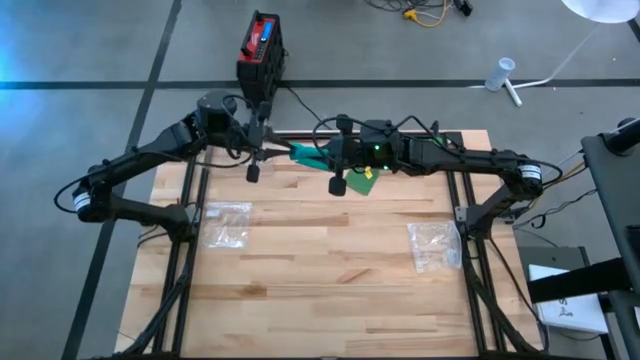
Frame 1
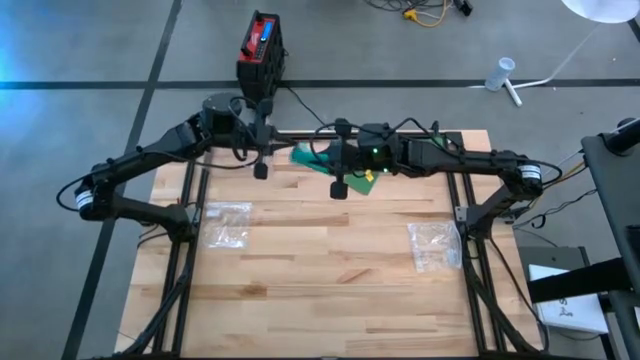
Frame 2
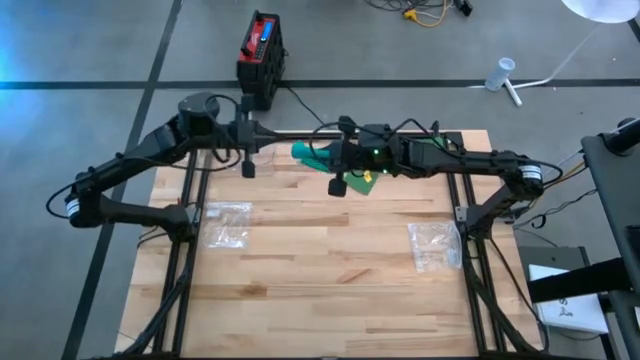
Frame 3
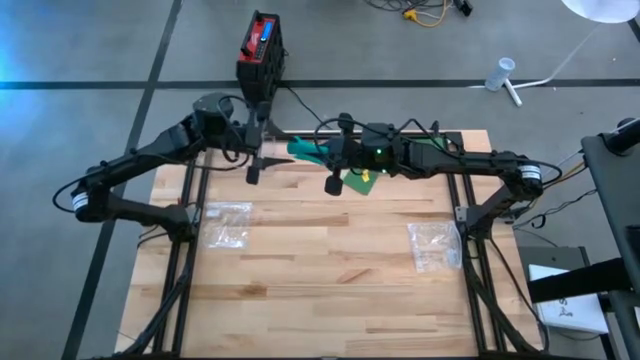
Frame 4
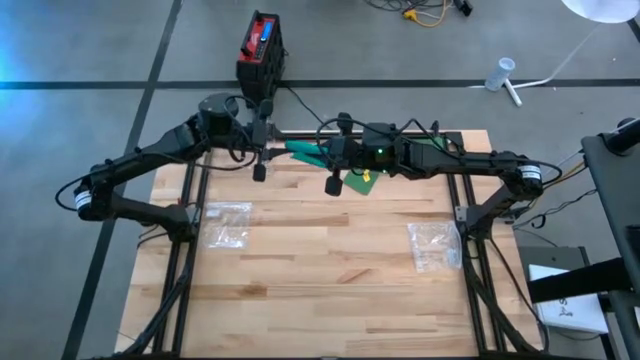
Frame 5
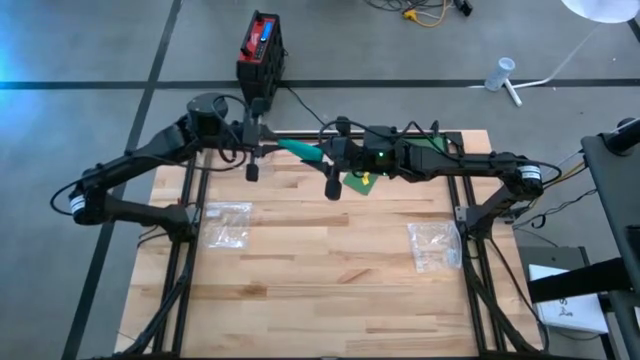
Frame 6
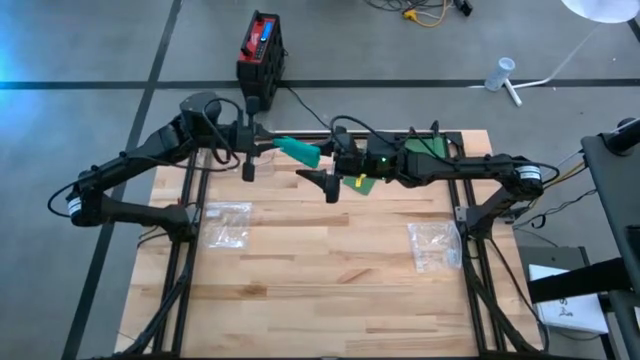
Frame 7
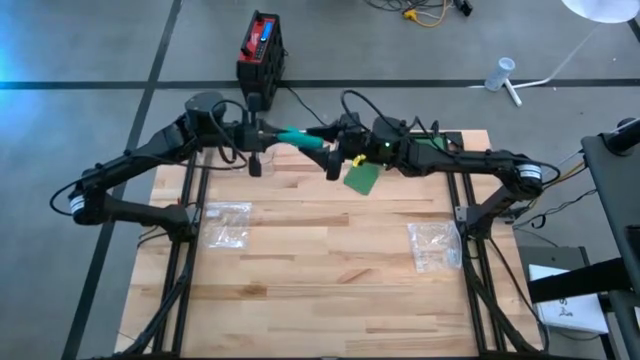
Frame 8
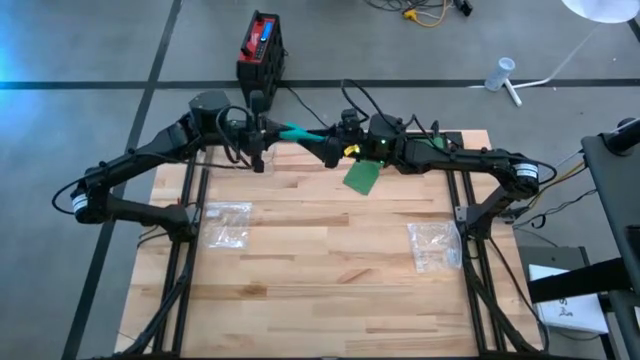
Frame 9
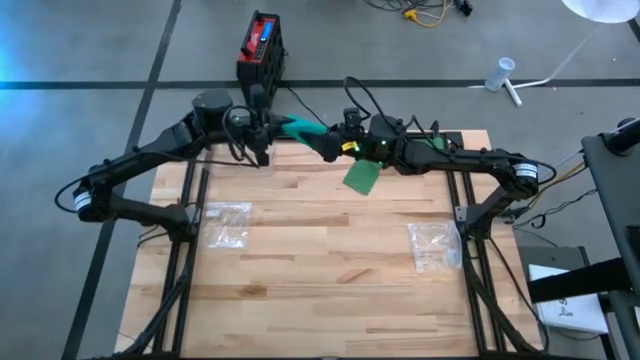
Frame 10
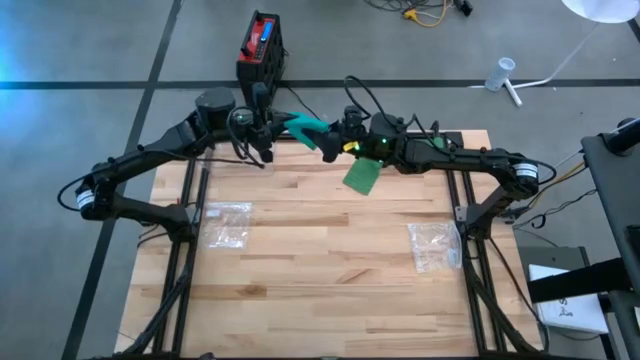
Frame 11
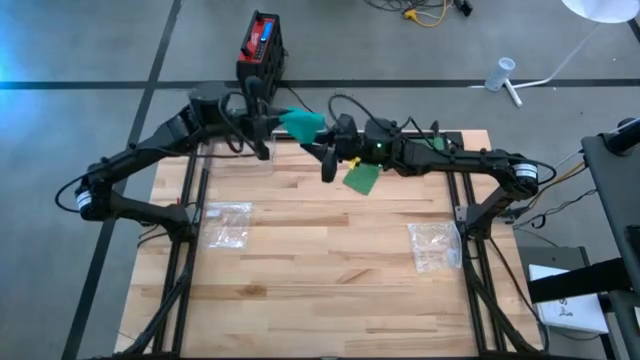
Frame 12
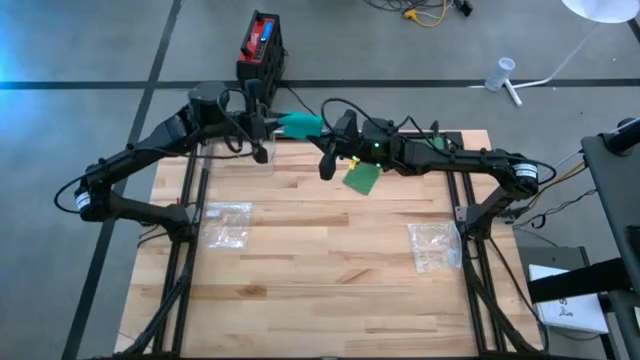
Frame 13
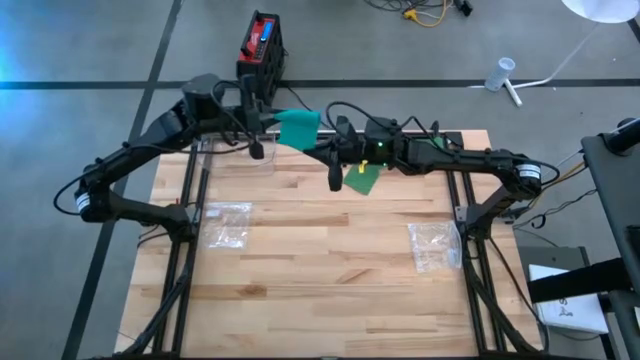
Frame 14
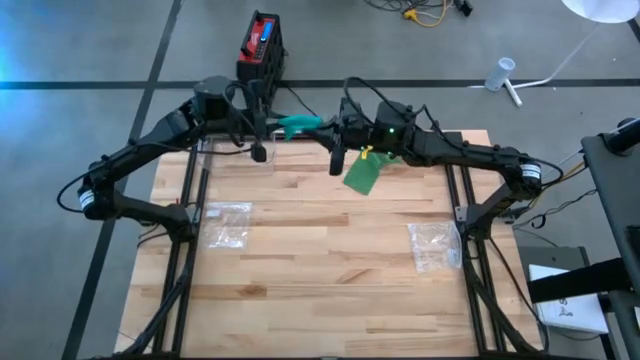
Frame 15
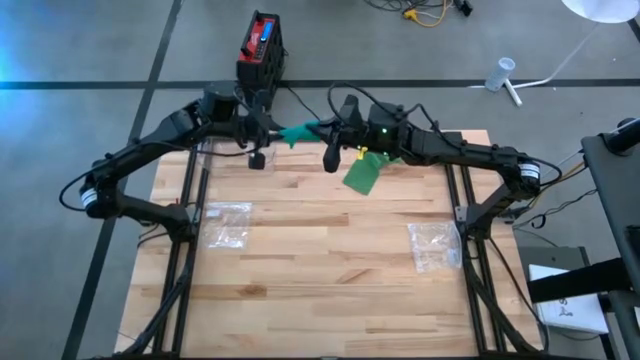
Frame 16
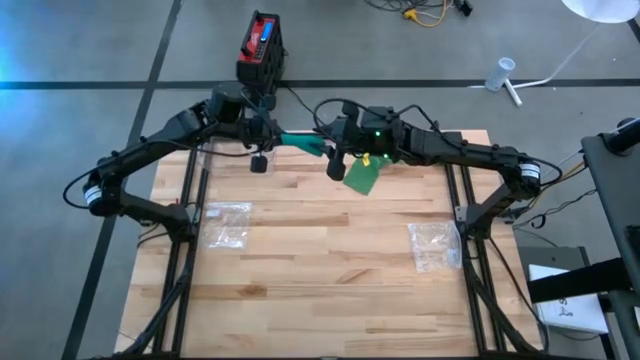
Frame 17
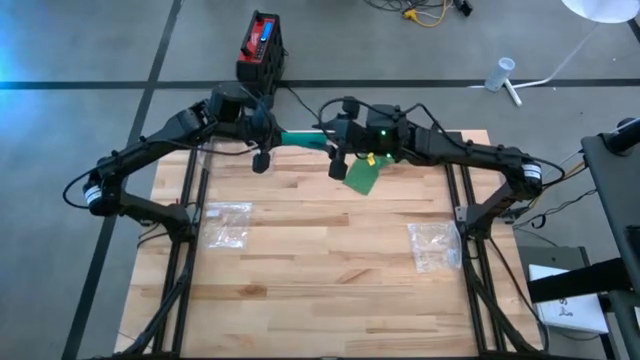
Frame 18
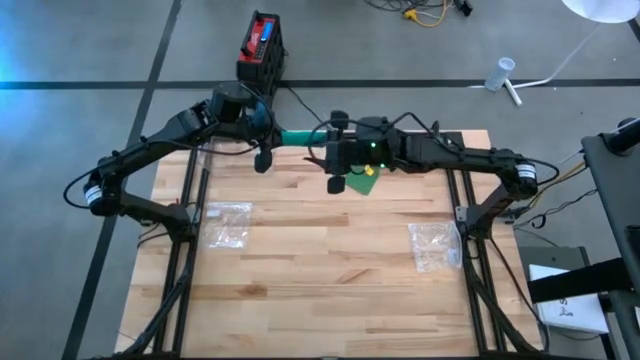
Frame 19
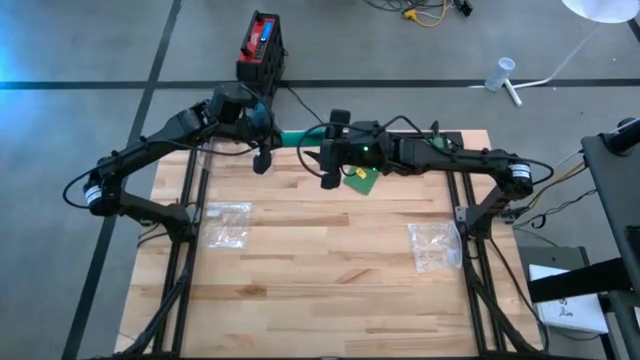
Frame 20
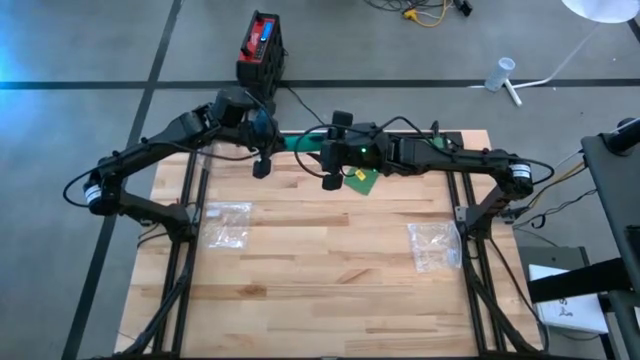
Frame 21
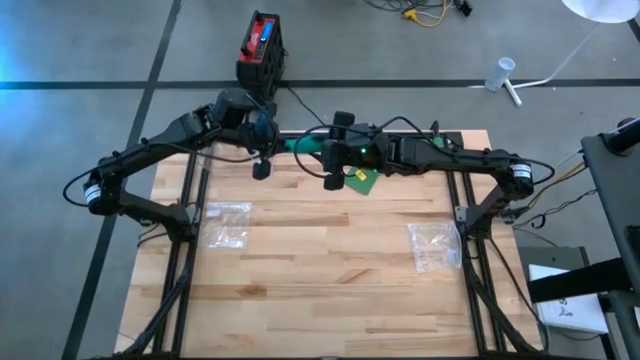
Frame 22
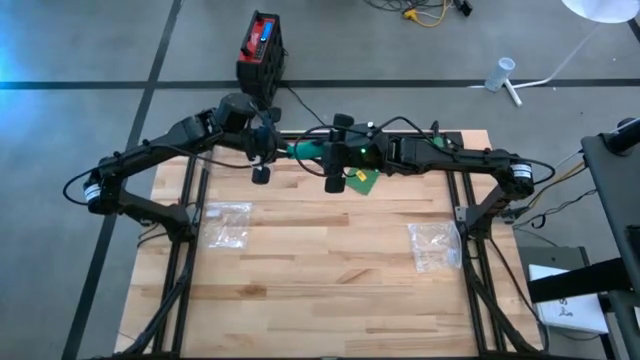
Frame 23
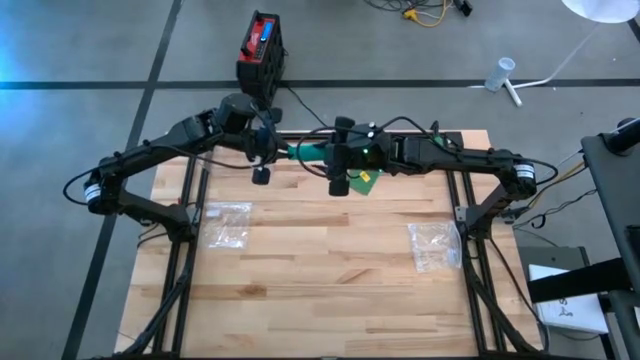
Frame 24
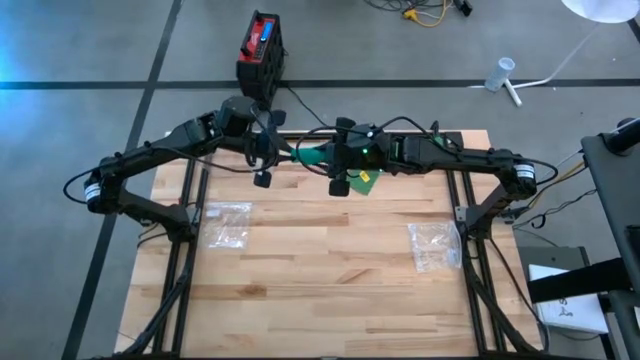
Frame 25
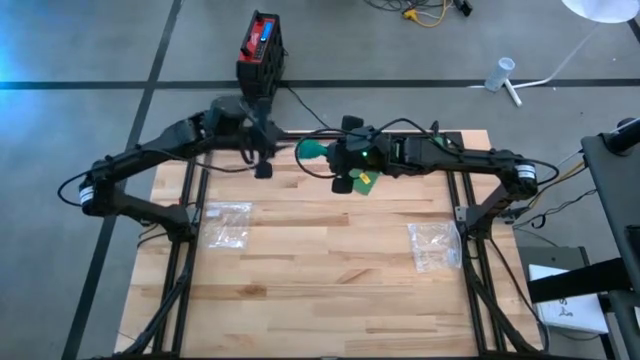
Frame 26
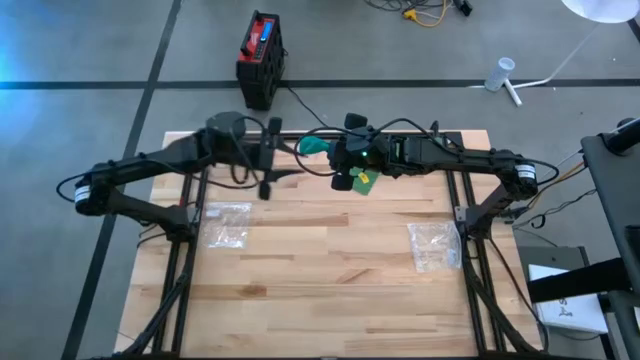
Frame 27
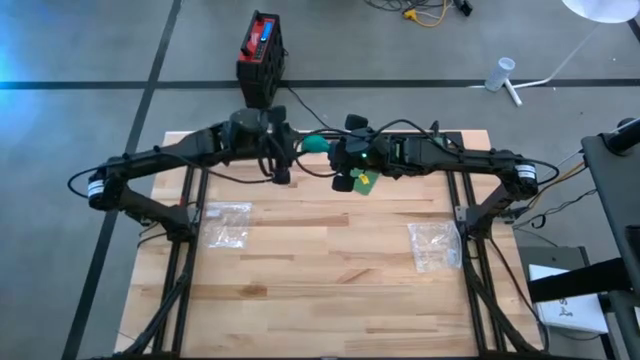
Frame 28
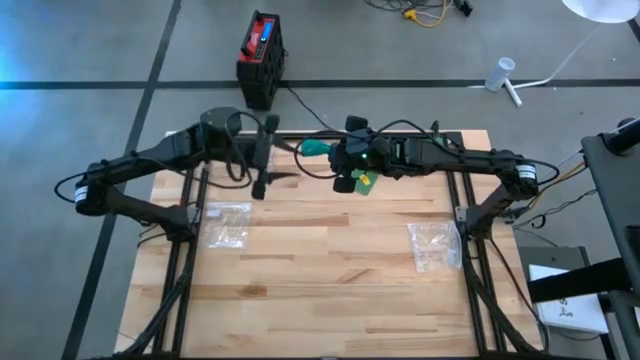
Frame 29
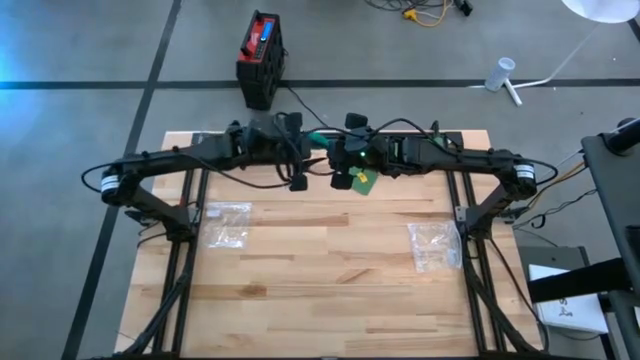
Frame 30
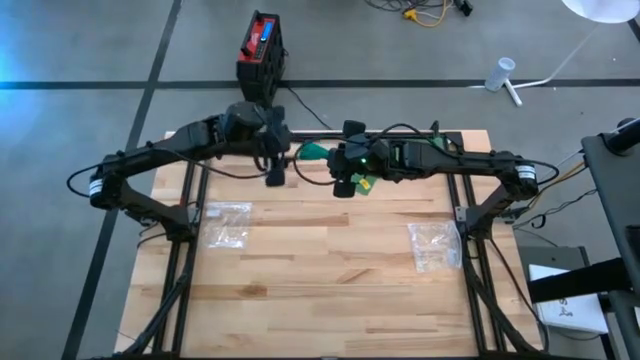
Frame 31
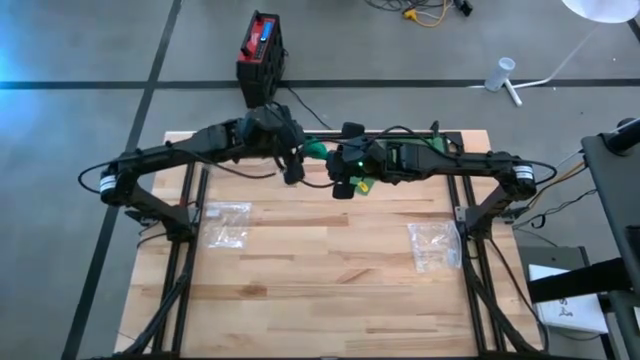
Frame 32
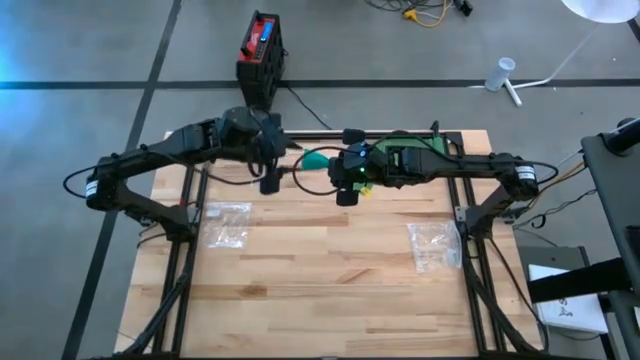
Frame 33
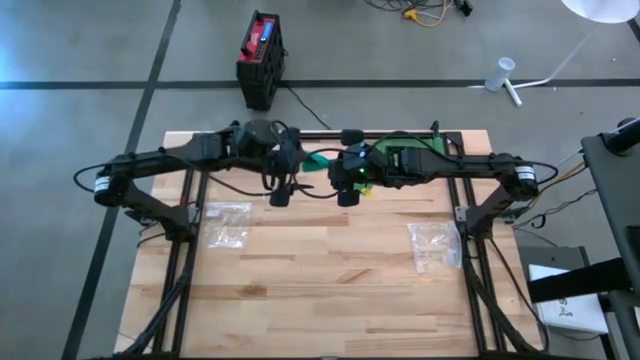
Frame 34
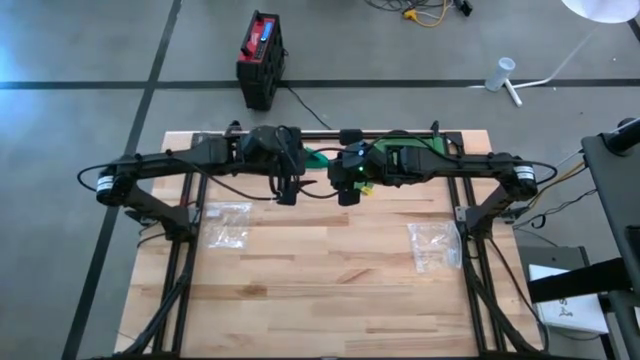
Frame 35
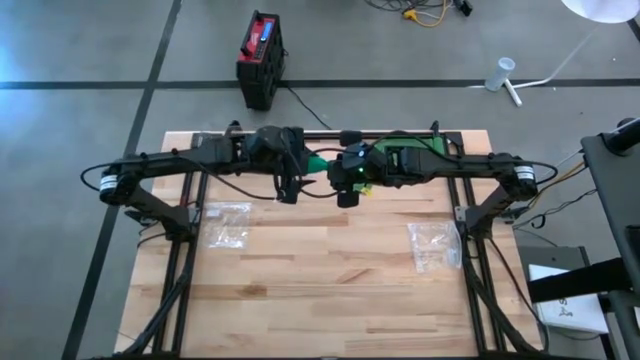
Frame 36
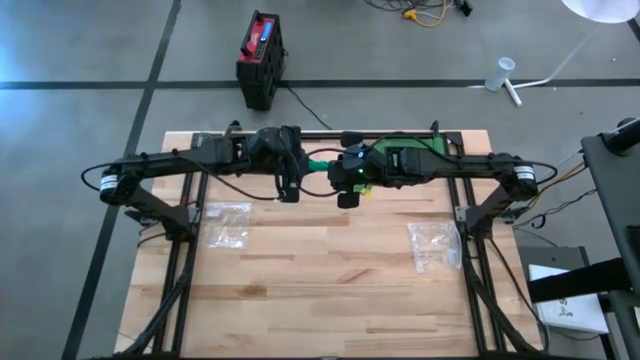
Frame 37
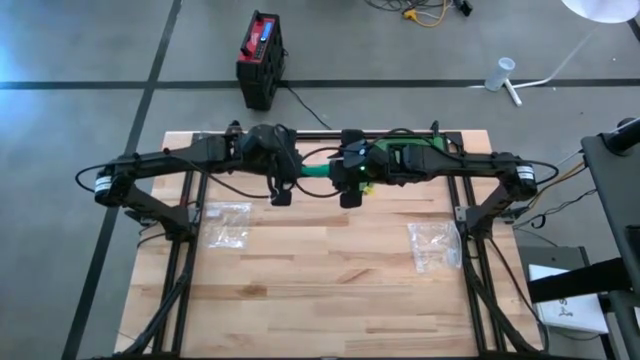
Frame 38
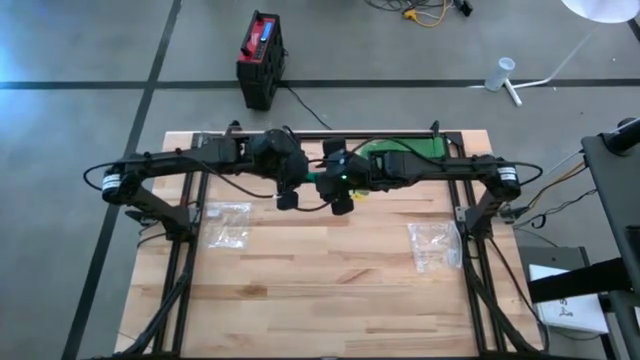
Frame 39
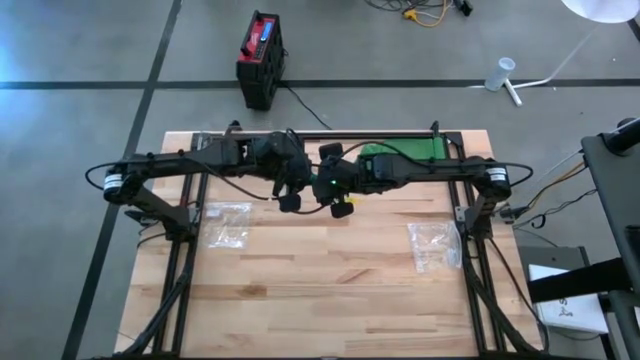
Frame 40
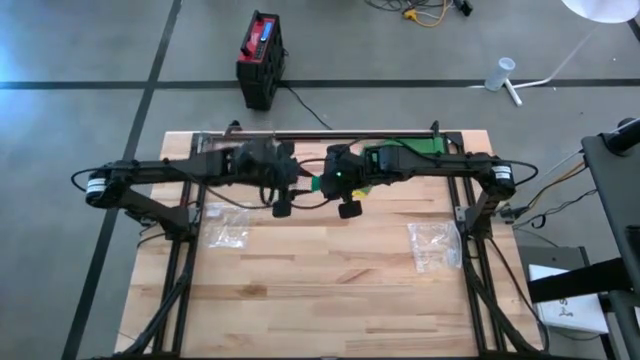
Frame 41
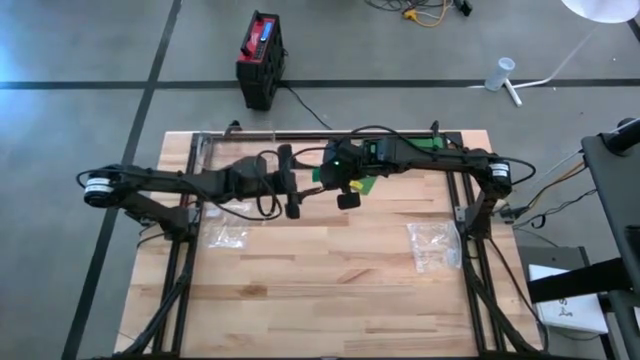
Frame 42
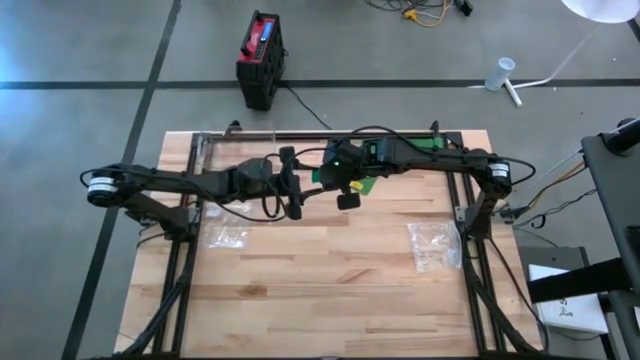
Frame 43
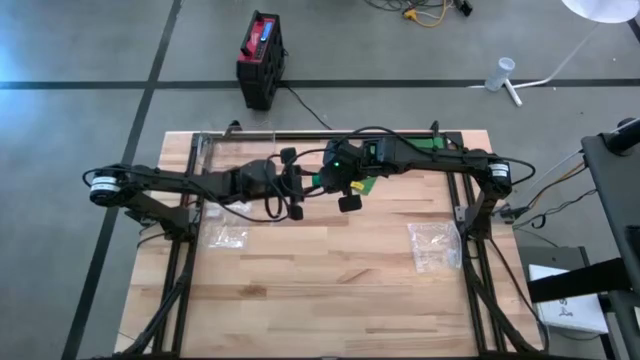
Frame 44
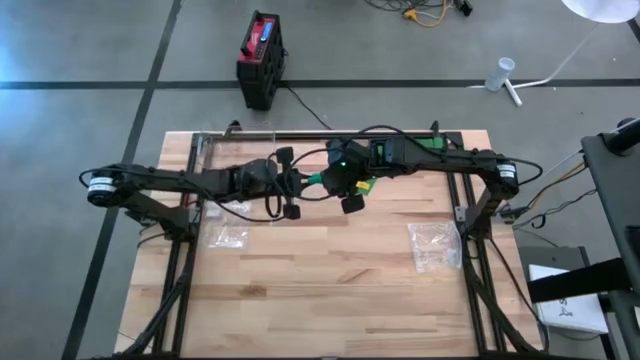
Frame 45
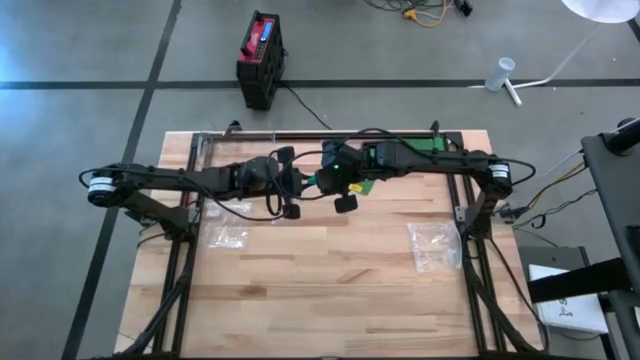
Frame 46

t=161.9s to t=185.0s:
Task: Roll bandage
Roll the blue bandage
